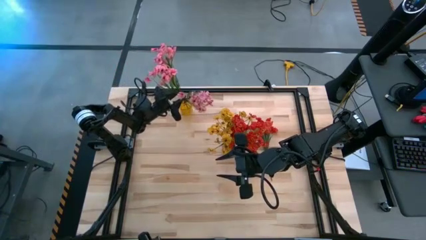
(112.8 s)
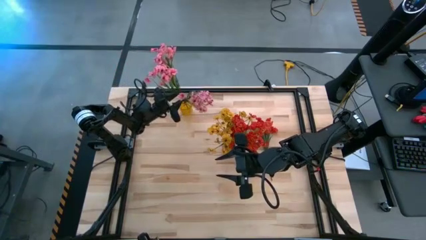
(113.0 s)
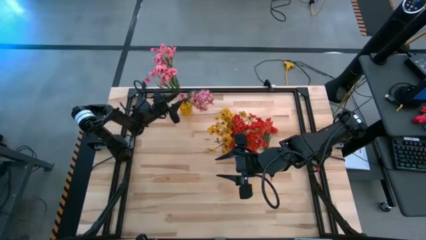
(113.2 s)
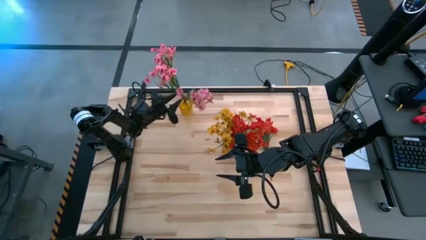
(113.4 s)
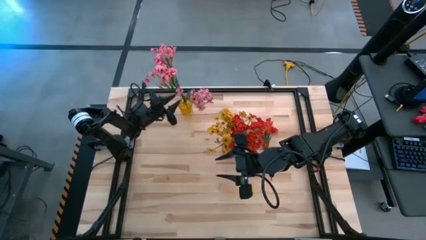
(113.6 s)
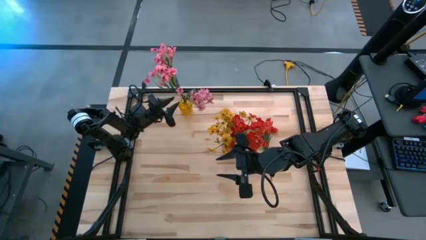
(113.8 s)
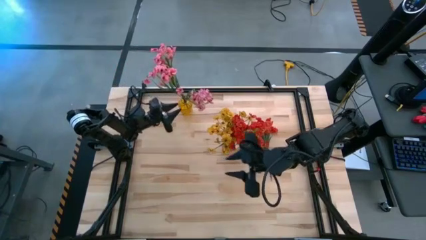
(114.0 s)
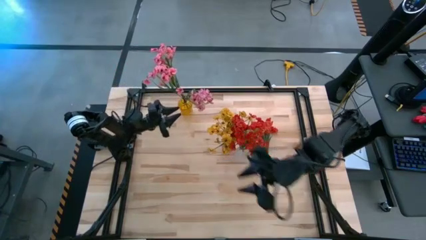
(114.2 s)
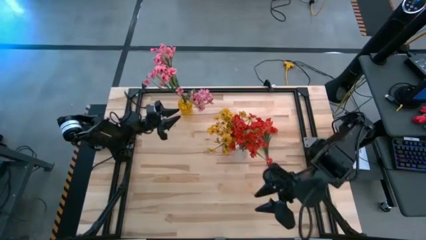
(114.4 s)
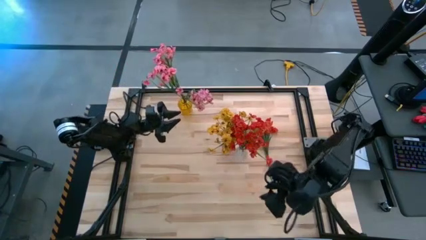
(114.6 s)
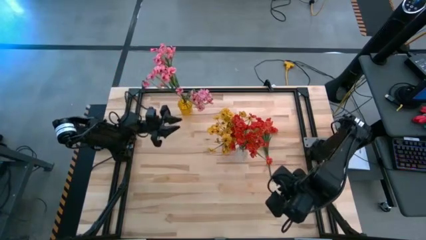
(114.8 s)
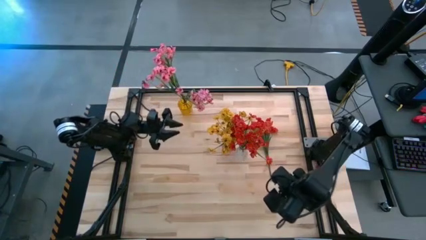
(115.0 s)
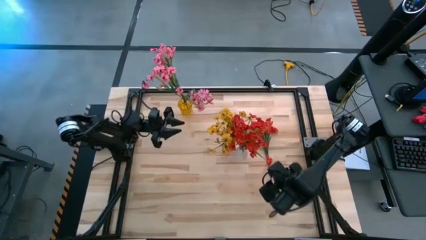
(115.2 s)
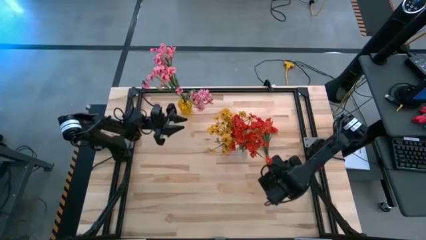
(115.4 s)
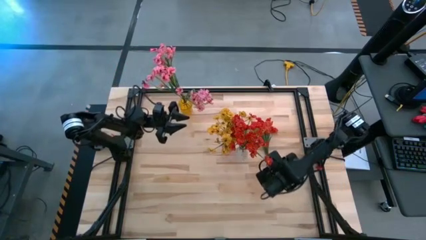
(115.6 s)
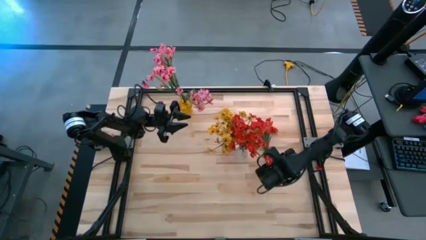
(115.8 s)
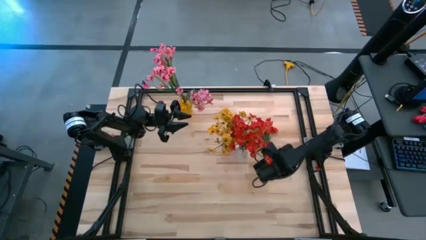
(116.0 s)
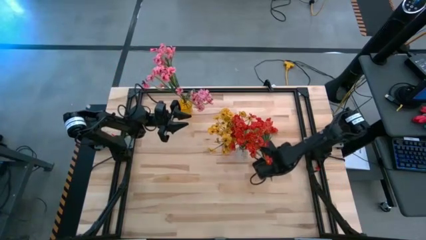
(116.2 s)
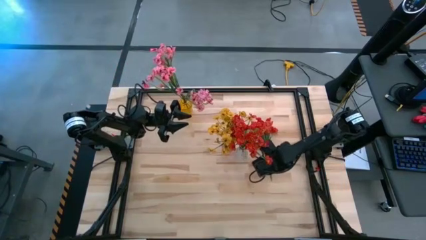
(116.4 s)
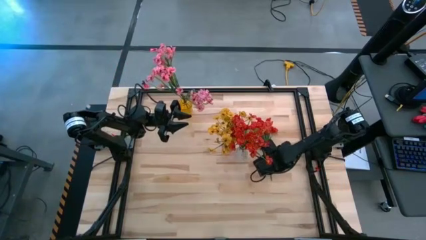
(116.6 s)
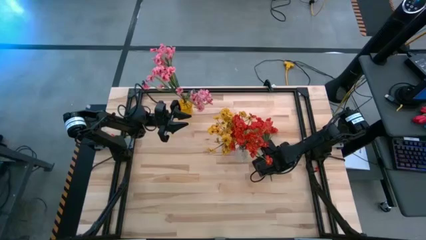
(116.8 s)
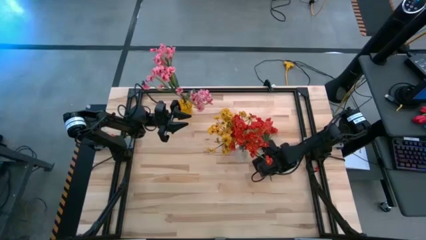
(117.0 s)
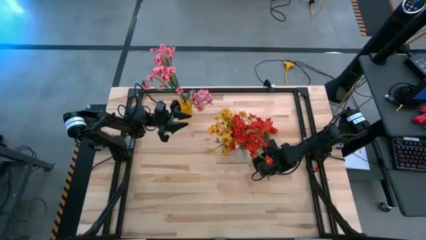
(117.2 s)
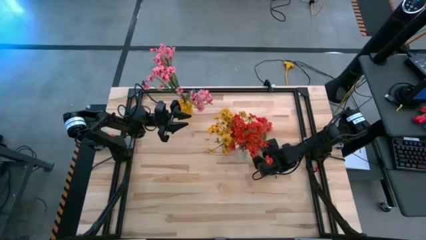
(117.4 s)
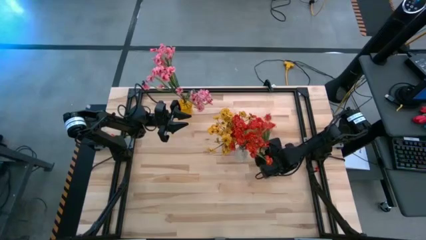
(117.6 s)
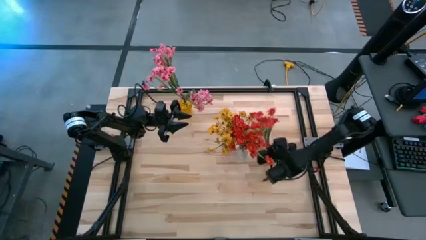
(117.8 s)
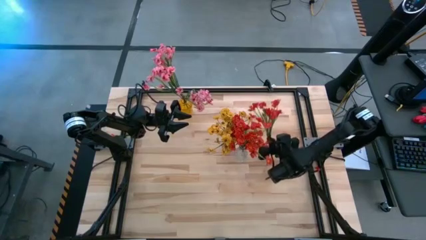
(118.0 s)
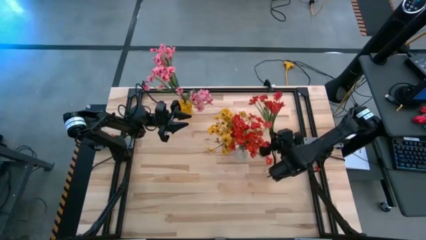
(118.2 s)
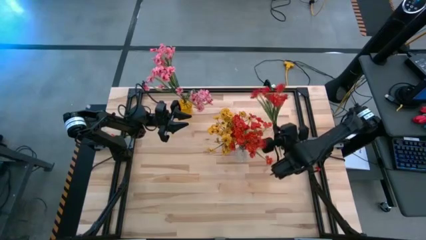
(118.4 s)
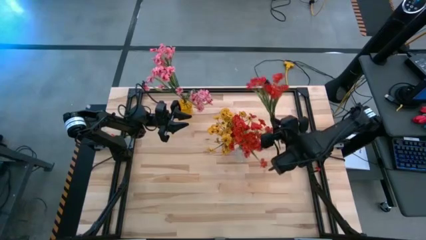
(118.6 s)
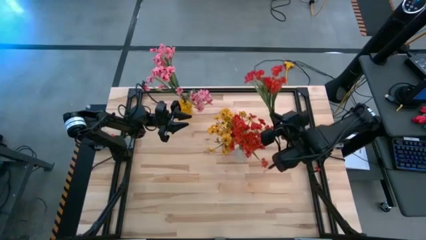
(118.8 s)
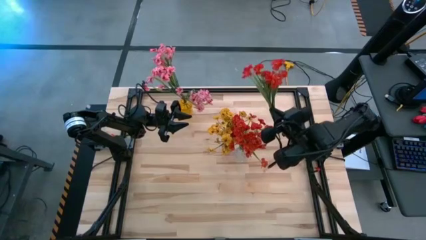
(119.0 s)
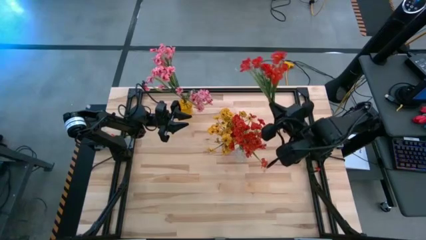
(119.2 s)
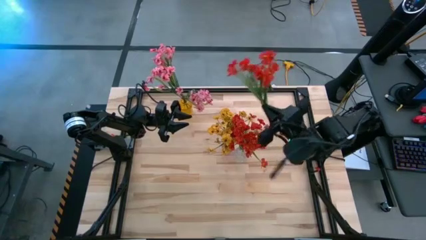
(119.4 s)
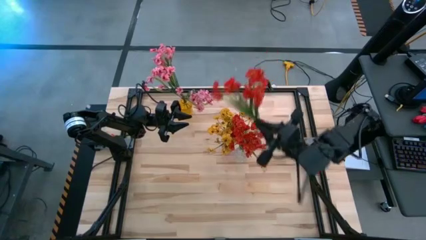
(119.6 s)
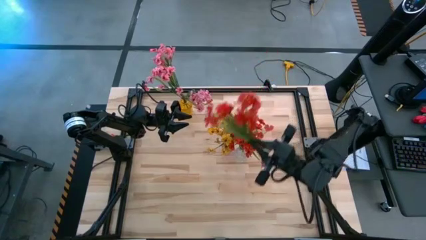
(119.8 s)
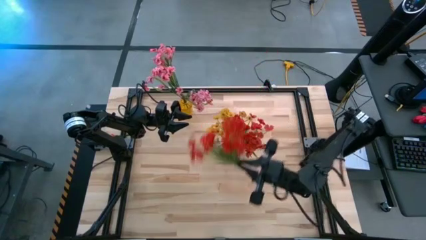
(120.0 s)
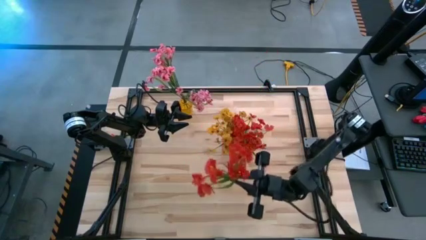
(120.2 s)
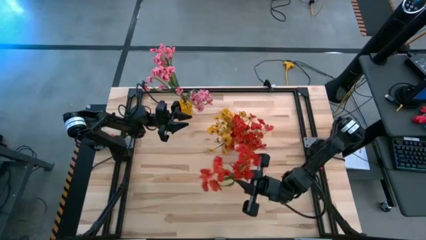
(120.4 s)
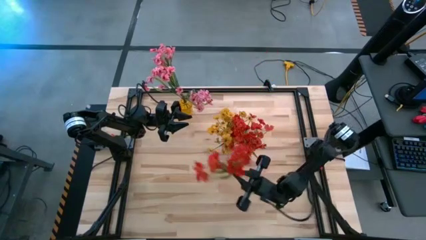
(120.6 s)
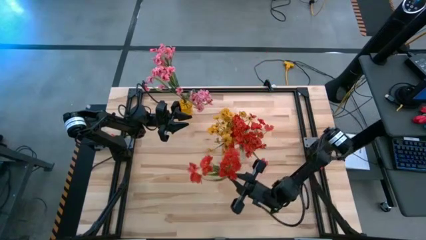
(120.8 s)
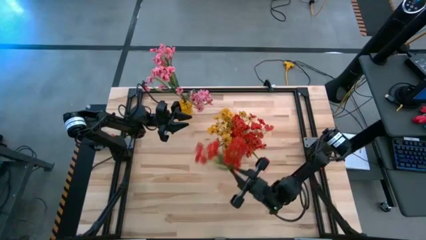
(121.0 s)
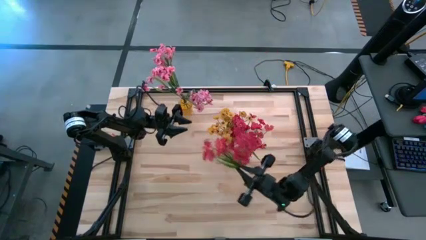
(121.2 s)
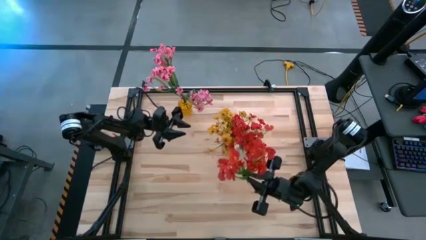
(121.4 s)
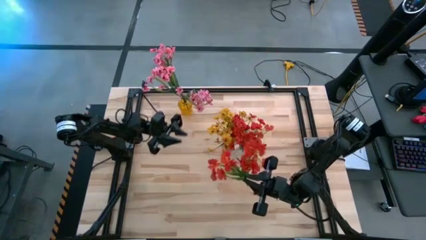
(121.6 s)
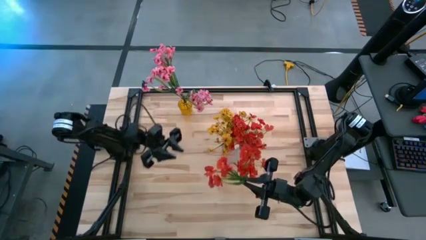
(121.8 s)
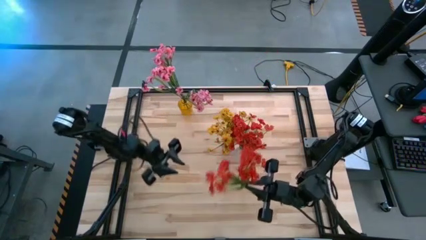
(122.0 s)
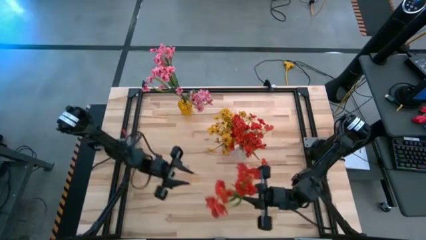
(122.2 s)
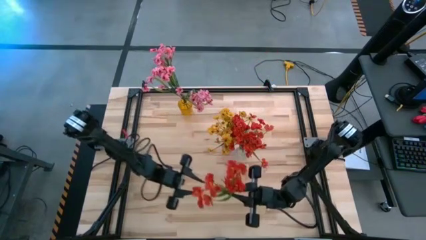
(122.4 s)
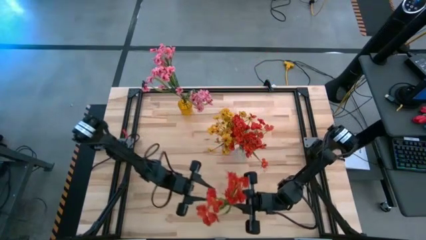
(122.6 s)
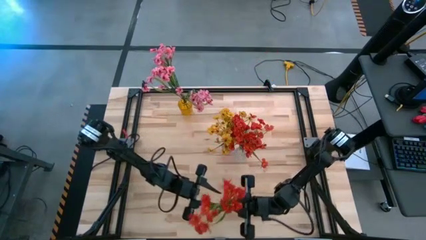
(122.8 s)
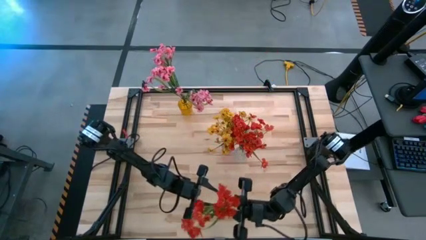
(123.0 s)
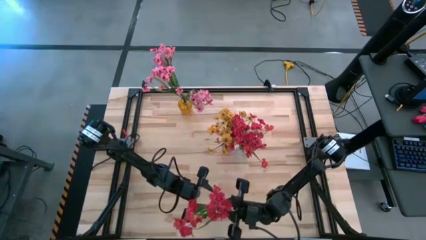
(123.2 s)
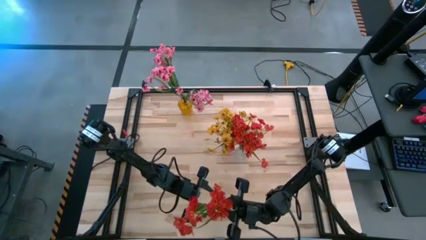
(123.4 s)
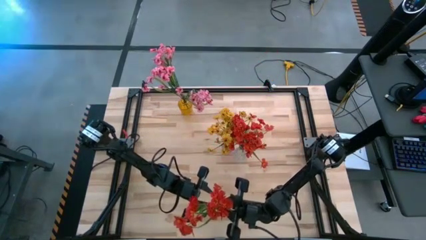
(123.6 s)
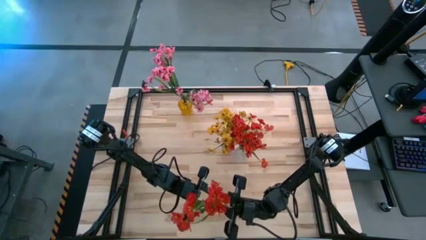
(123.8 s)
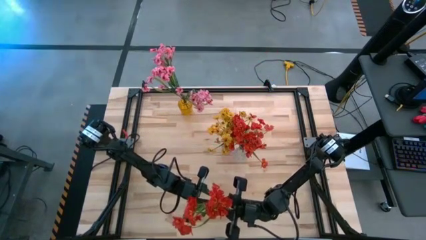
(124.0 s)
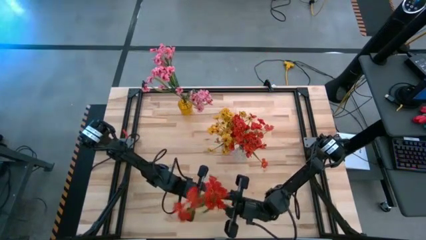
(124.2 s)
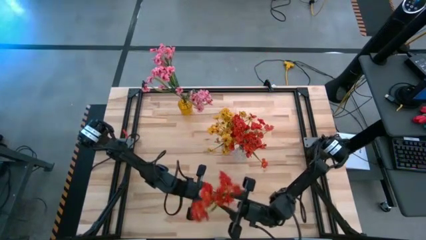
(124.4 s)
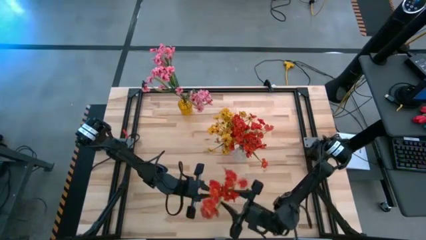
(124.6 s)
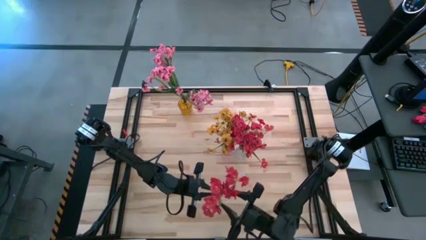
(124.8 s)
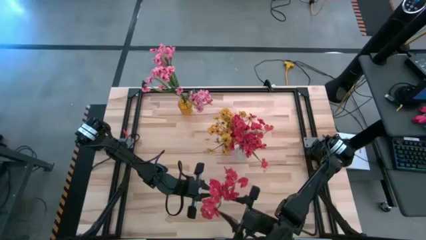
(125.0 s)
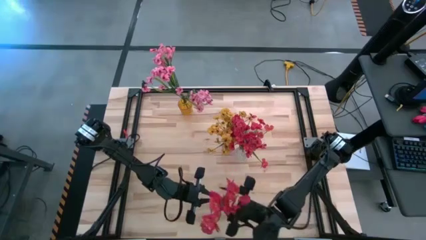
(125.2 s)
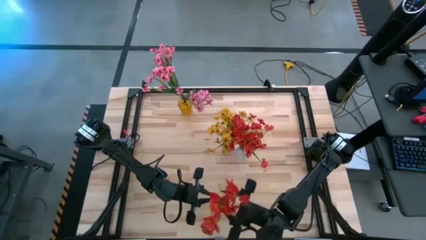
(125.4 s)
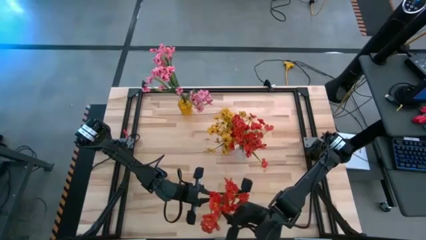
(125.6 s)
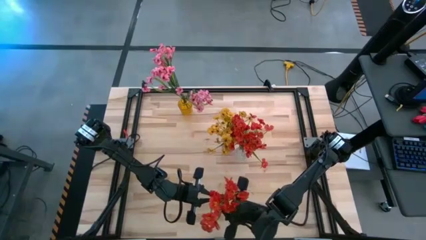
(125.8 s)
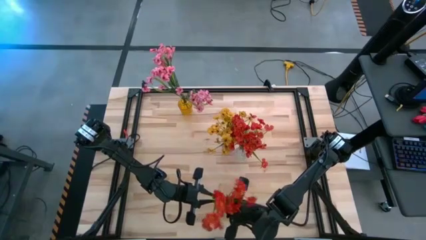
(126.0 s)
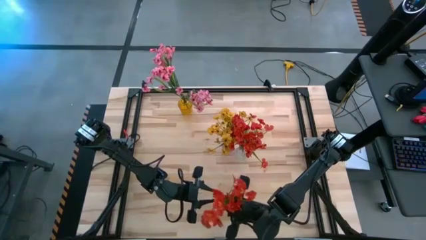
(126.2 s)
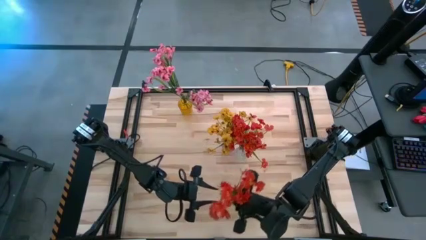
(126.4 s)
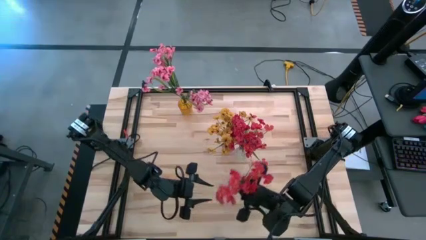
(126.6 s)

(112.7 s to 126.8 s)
Task: Sort flowers into vase by color
Put the red flowers into the transparent vase

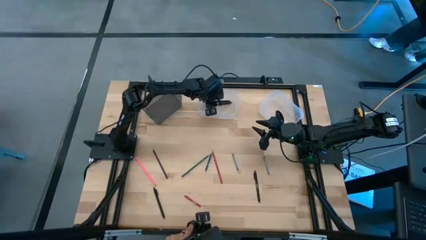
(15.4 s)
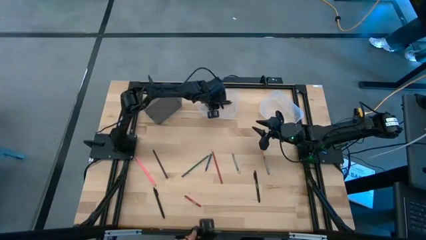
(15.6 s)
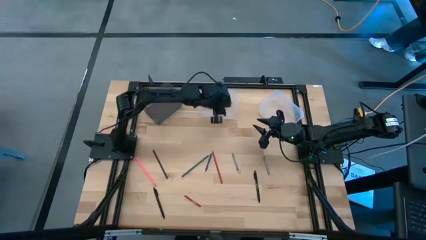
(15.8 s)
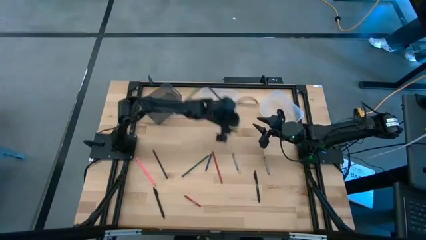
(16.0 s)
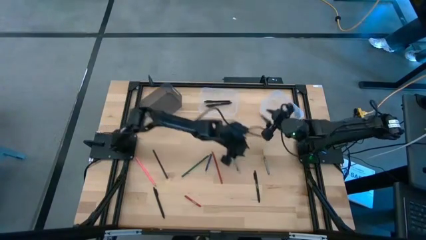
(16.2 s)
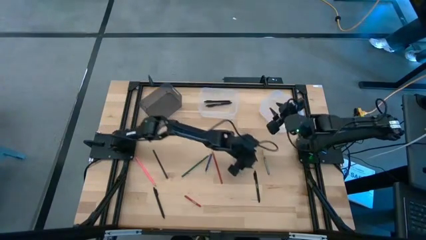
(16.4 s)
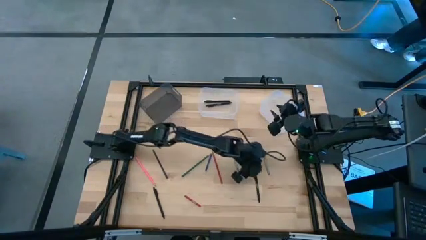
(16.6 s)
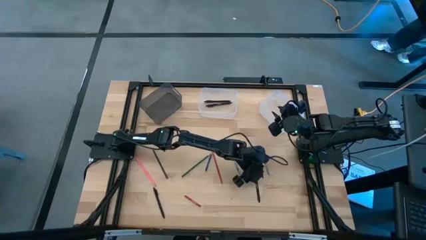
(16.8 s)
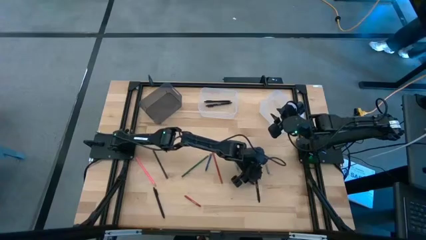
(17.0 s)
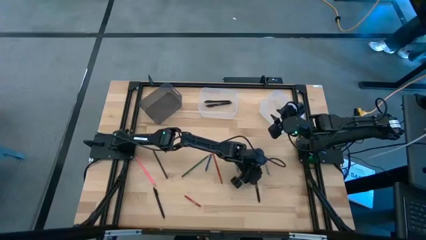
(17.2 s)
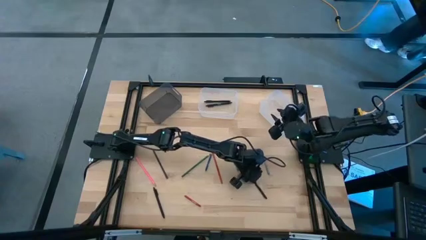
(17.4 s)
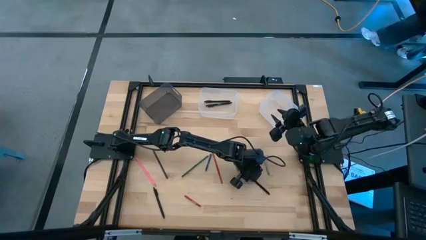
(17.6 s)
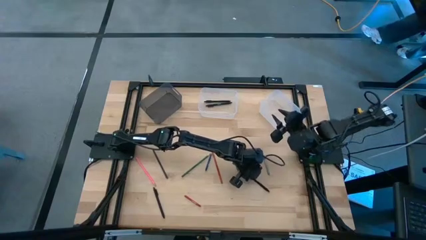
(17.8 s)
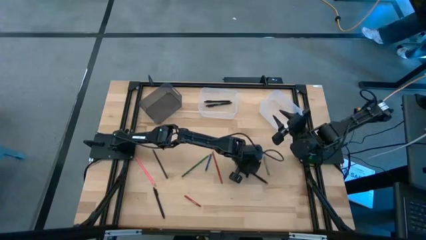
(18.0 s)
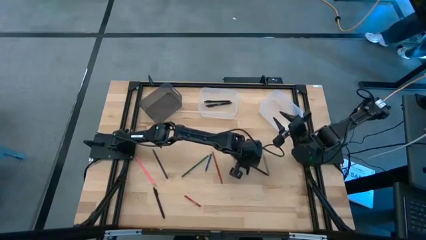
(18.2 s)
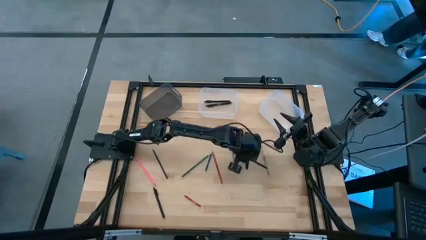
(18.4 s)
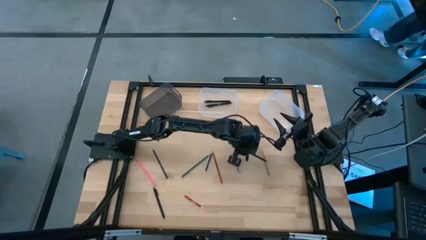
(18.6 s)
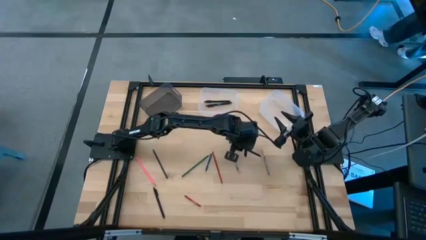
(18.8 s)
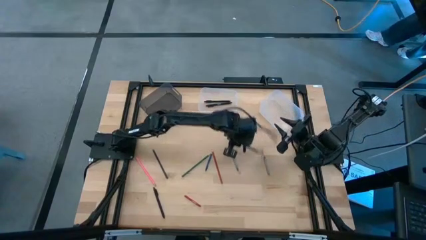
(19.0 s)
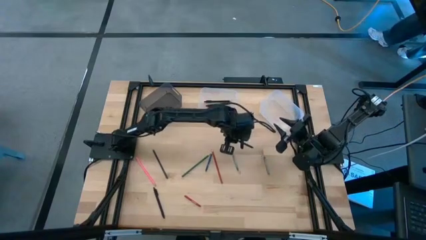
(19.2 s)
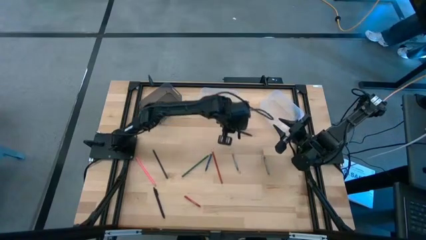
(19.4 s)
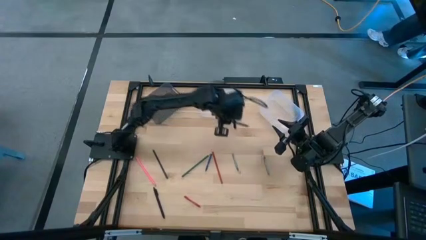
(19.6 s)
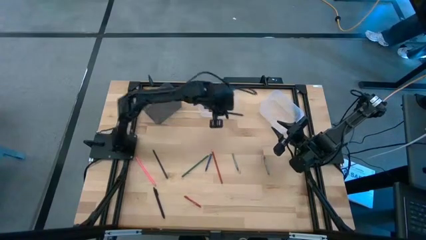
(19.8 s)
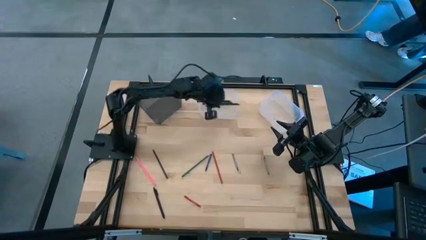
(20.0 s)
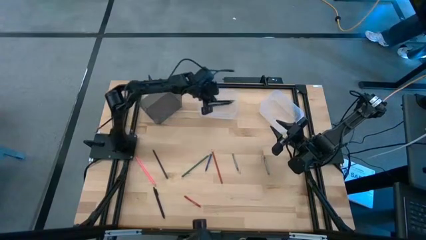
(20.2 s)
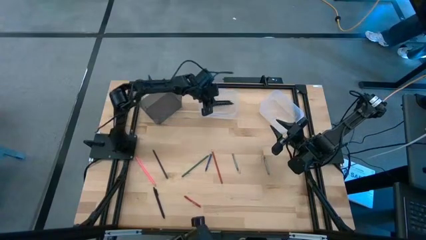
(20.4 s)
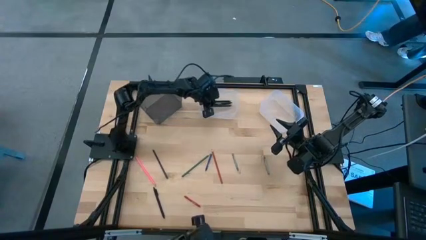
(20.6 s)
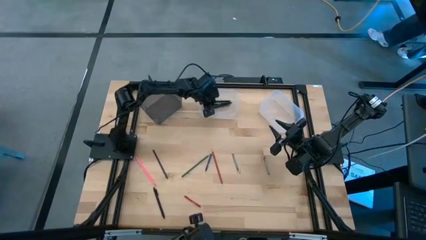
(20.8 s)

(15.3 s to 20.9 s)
Task: Sort crayons/erasers/pens/pencils in bins
Put the black pen into the left transparent bin
